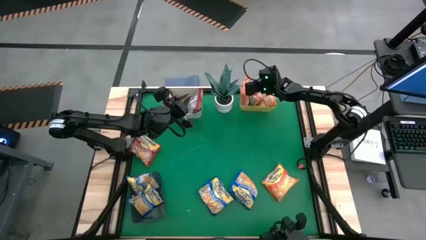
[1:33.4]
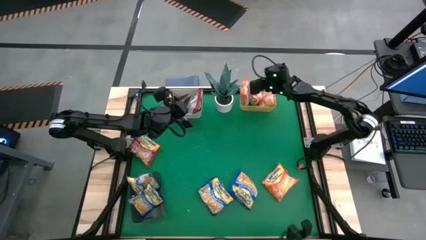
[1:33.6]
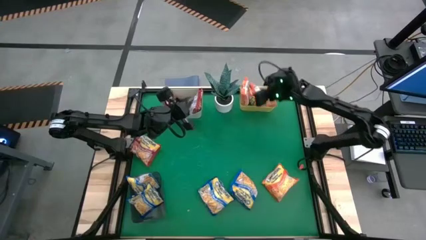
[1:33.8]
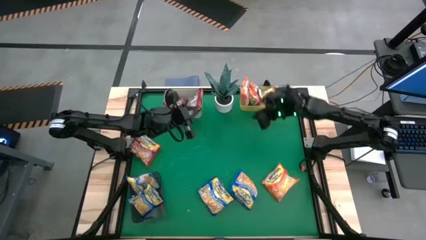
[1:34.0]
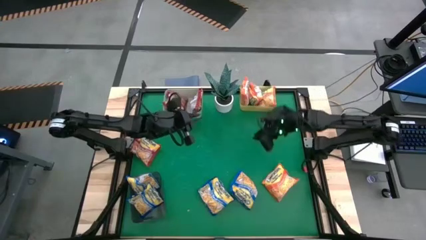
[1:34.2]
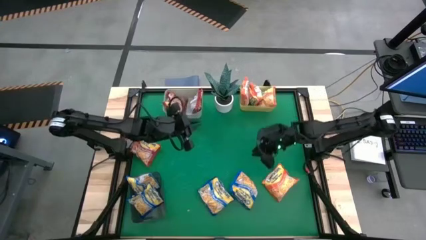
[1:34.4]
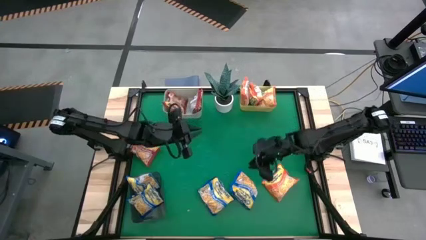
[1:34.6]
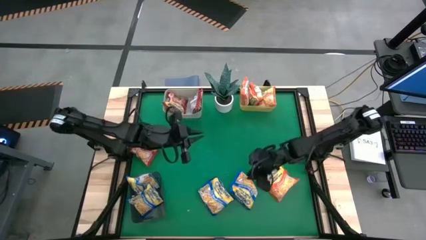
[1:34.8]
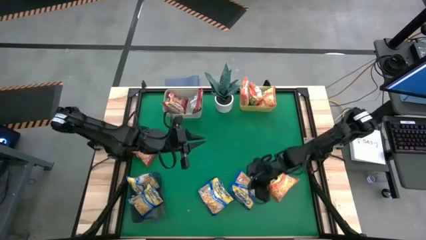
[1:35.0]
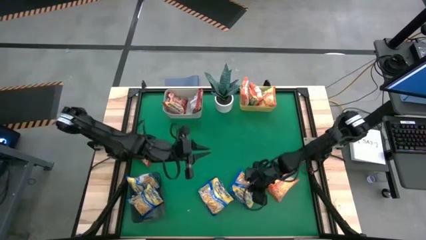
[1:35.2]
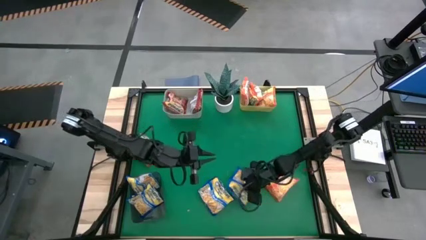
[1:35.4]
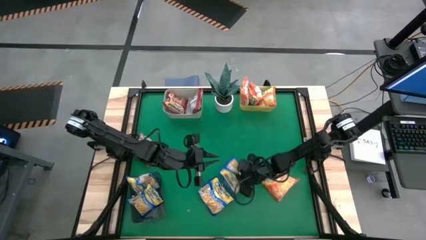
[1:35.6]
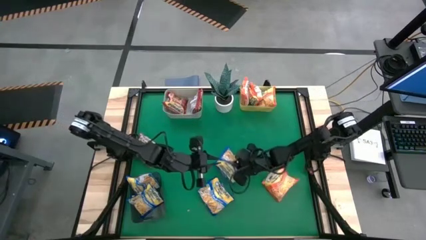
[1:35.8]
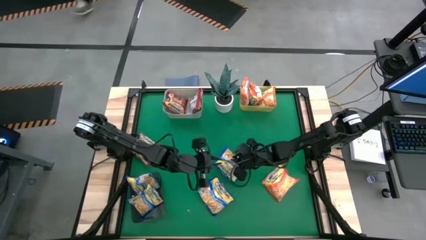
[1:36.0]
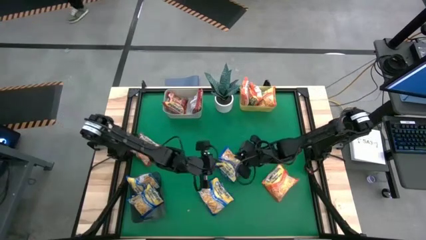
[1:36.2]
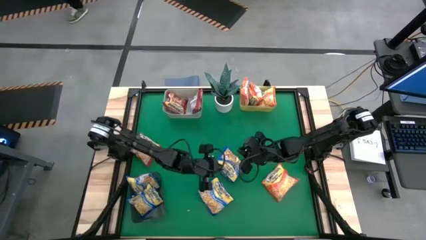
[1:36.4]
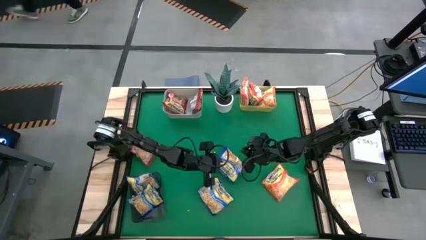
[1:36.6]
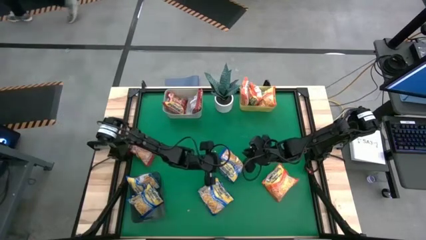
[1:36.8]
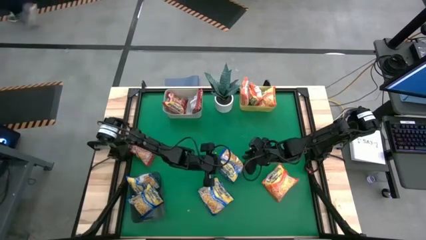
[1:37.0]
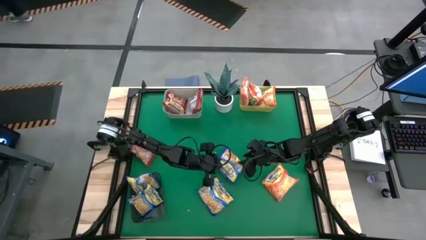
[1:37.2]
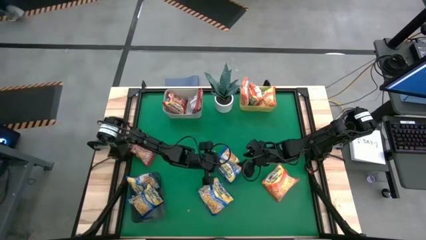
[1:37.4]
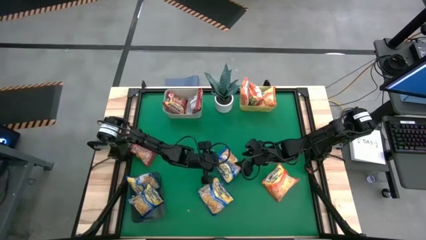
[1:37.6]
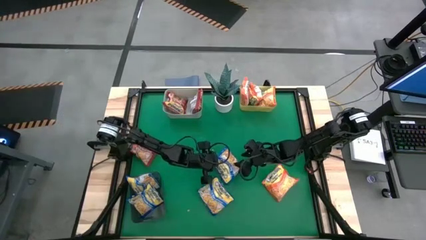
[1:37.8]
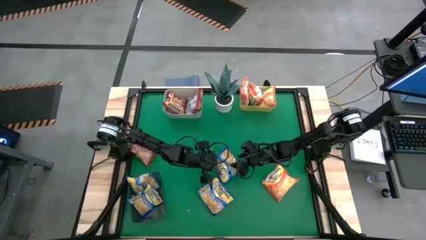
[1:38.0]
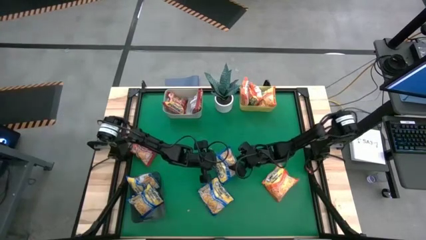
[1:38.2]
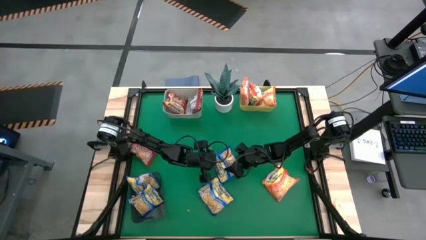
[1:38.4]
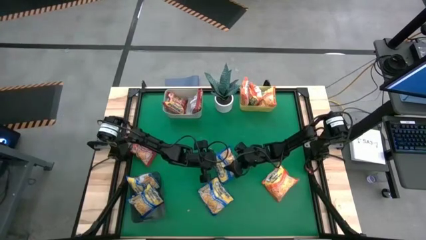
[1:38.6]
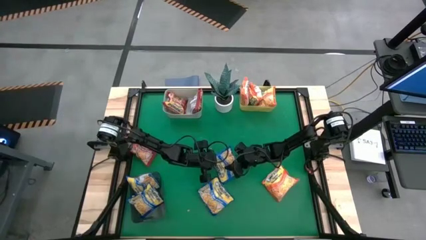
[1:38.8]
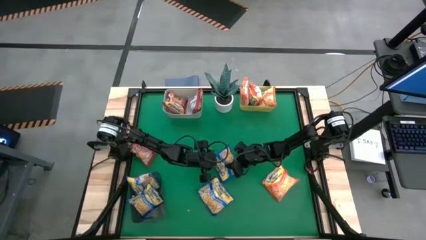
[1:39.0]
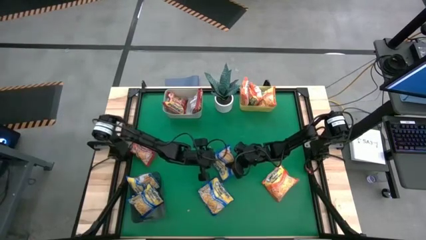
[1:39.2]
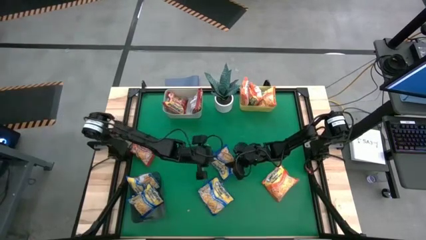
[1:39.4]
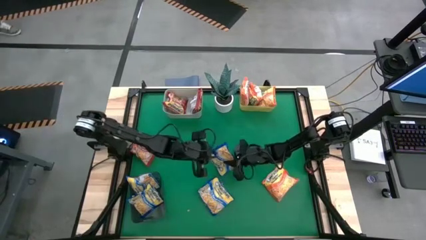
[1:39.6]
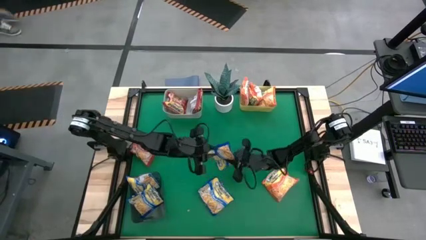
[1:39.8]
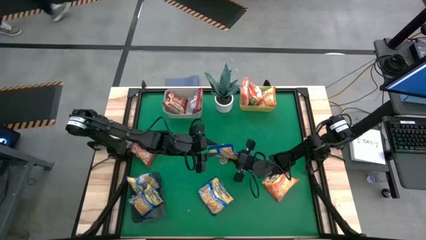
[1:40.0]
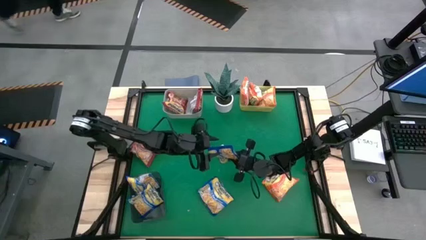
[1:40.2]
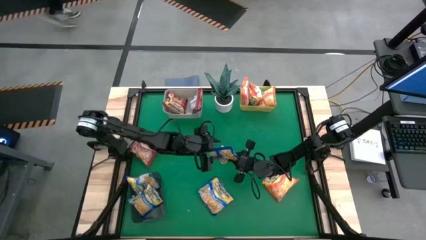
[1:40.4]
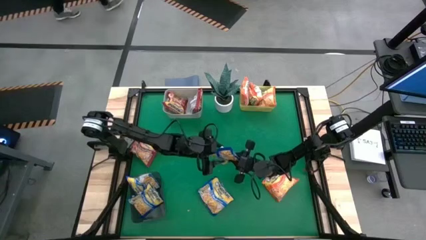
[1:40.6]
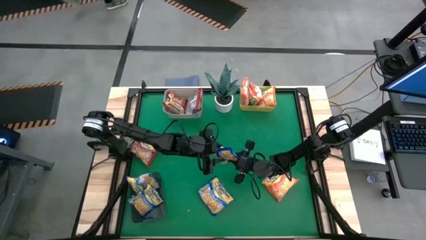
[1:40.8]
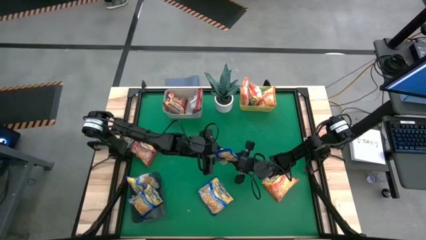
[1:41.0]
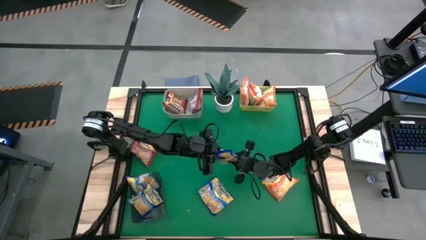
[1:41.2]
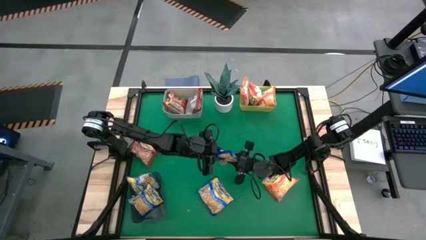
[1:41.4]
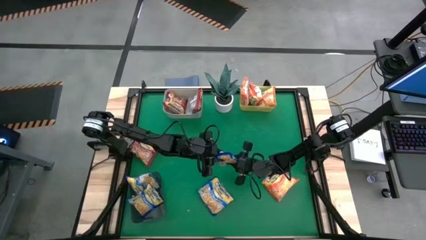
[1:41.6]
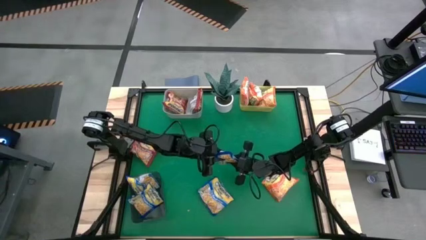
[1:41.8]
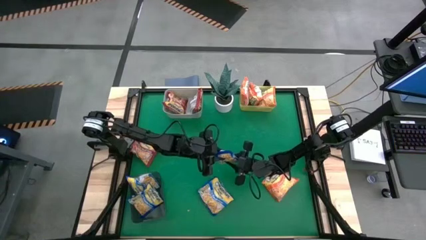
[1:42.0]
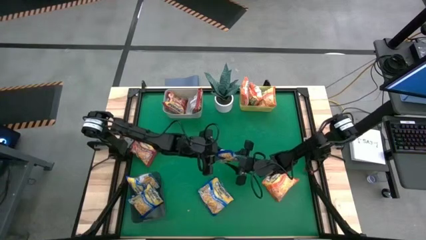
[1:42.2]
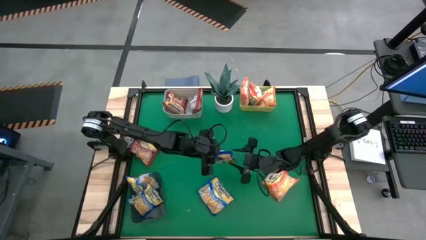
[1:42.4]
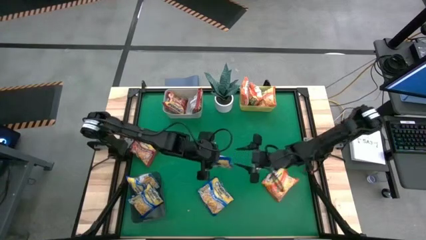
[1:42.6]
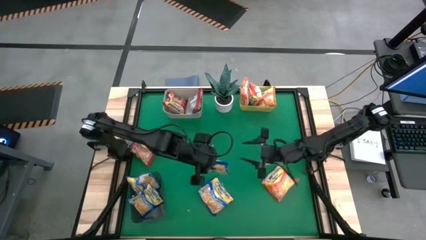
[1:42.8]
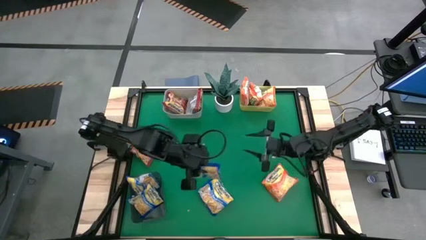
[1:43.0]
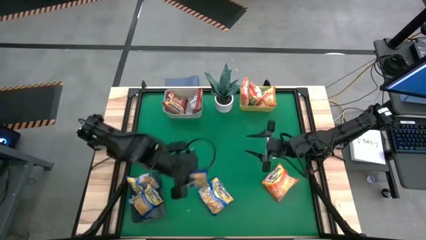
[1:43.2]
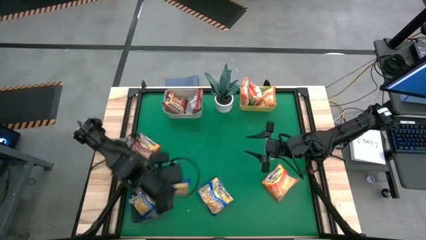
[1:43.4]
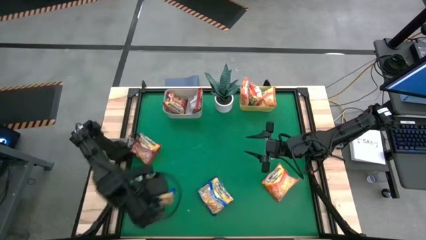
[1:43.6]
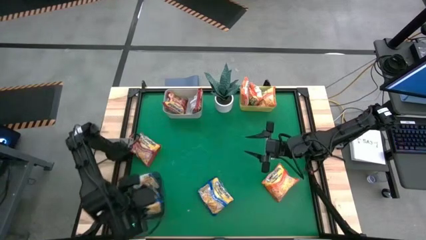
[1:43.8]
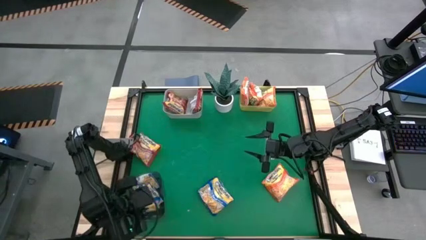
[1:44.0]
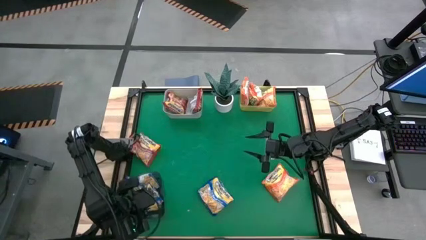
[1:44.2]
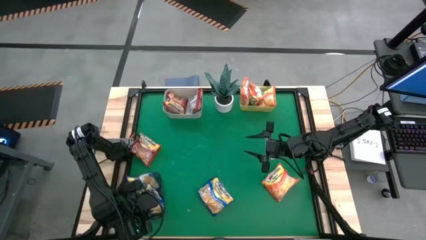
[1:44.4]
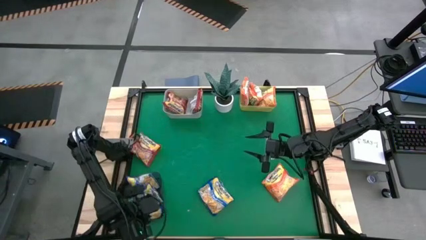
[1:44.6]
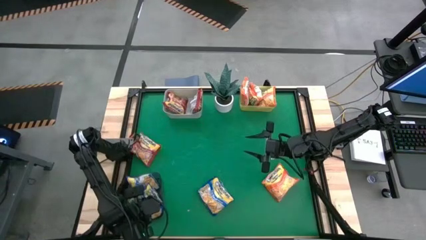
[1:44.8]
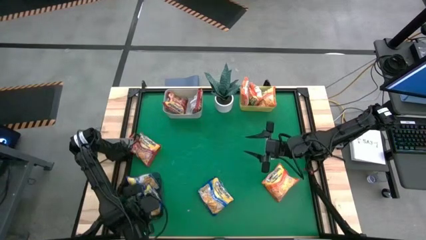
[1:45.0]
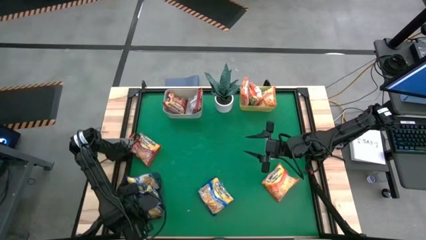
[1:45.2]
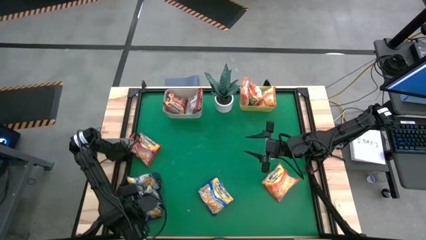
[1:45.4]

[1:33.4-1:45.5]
Task: Sort Maruchan noodles
Put the center blue noodle pack into the black bin
